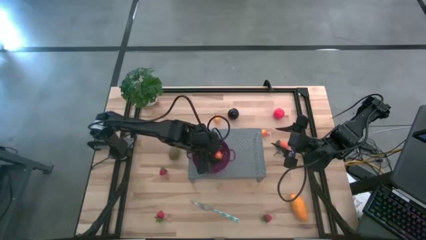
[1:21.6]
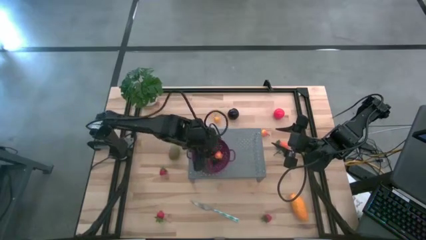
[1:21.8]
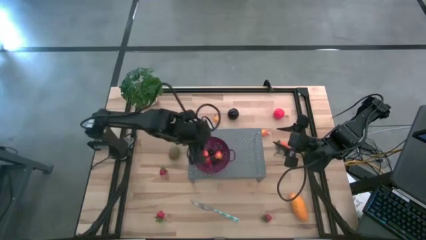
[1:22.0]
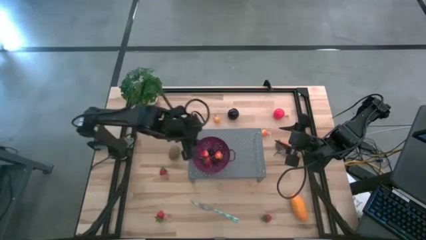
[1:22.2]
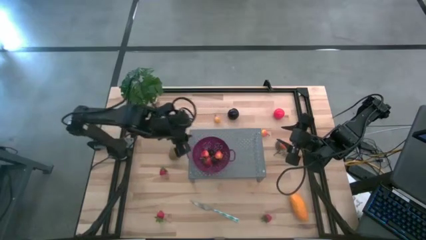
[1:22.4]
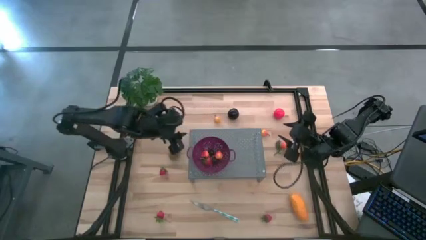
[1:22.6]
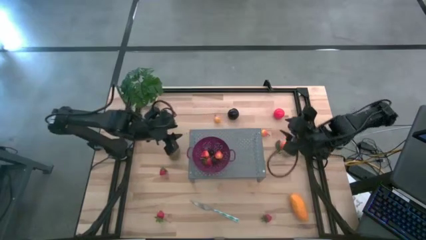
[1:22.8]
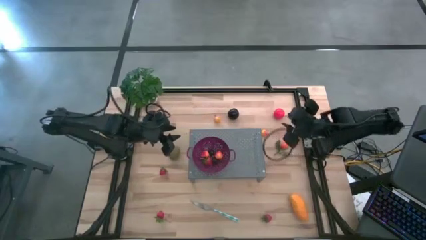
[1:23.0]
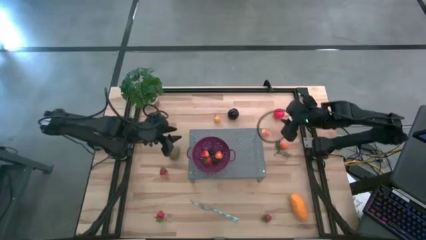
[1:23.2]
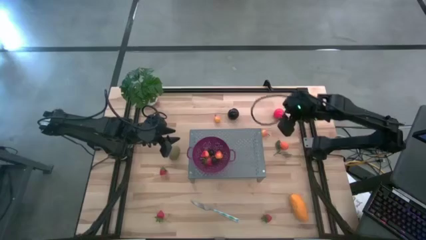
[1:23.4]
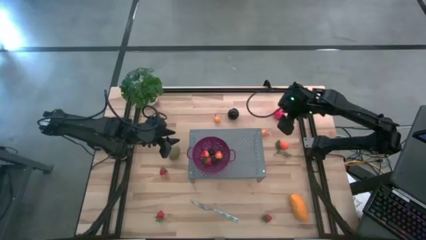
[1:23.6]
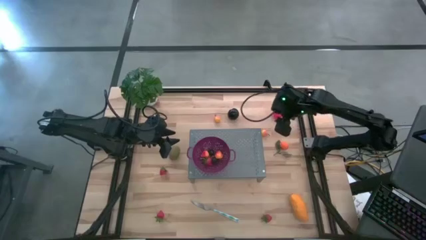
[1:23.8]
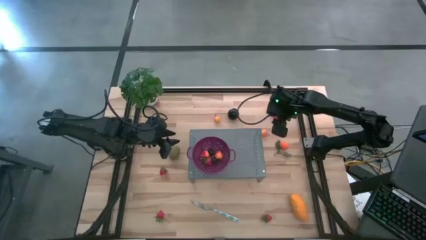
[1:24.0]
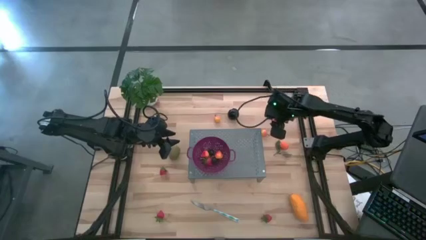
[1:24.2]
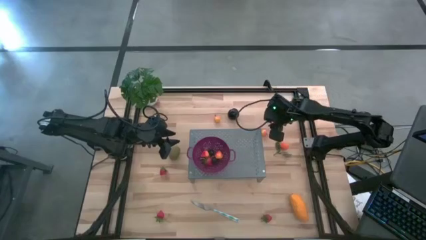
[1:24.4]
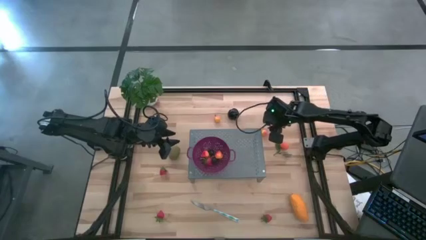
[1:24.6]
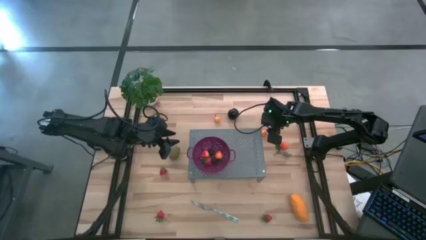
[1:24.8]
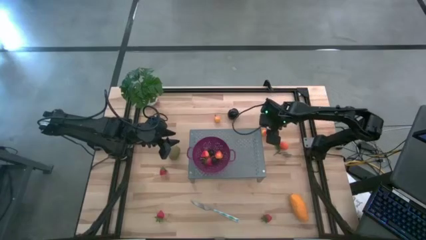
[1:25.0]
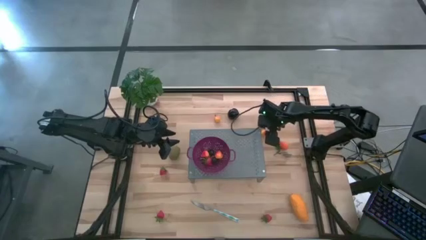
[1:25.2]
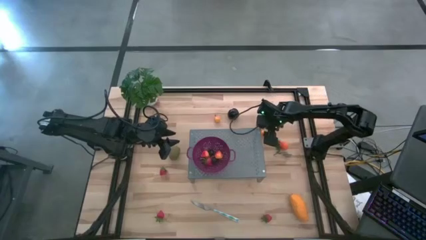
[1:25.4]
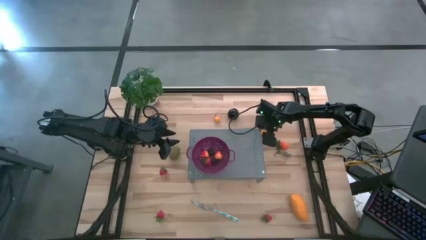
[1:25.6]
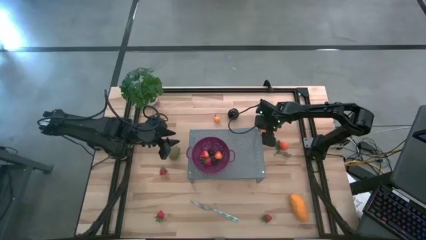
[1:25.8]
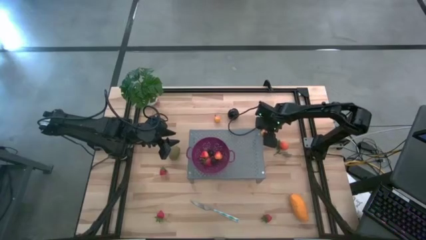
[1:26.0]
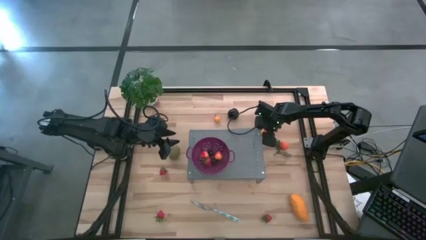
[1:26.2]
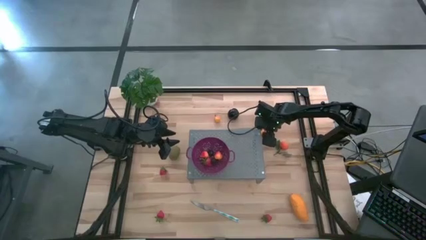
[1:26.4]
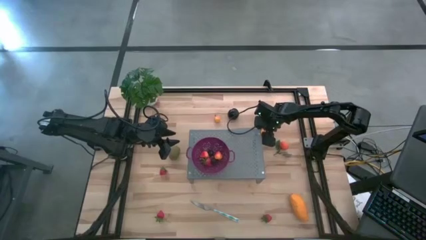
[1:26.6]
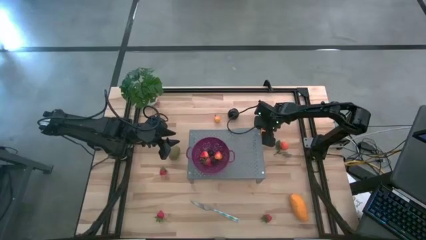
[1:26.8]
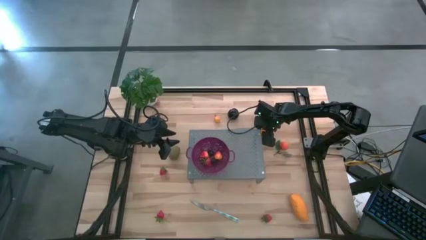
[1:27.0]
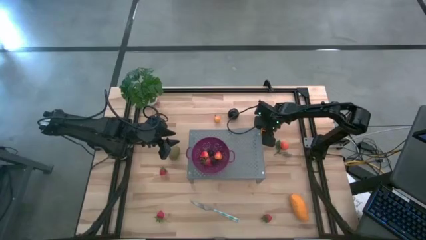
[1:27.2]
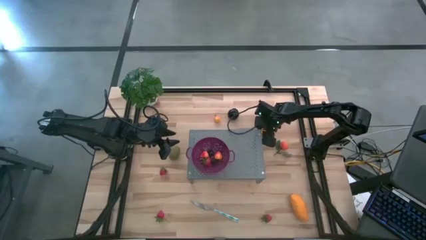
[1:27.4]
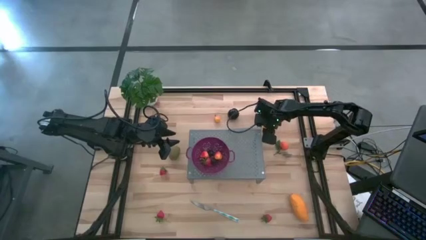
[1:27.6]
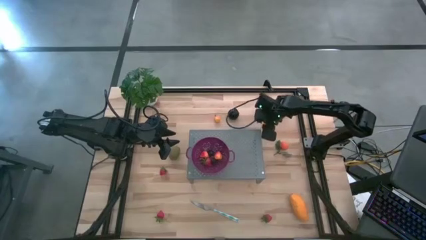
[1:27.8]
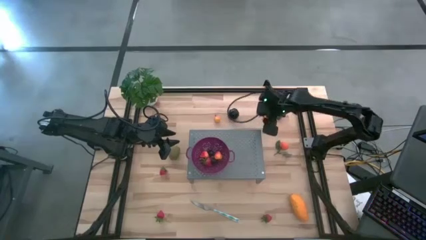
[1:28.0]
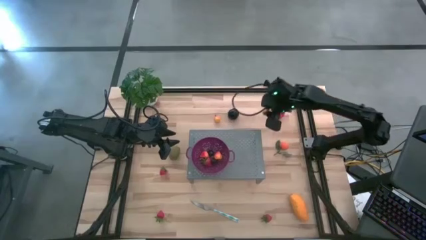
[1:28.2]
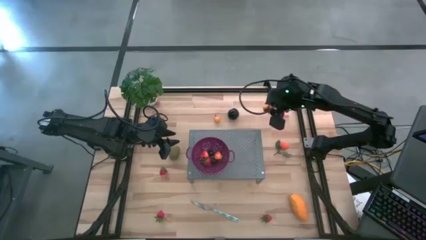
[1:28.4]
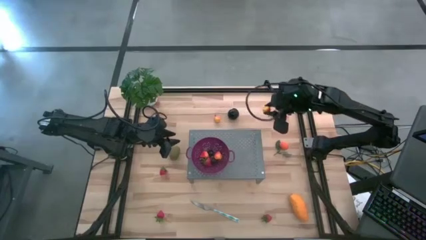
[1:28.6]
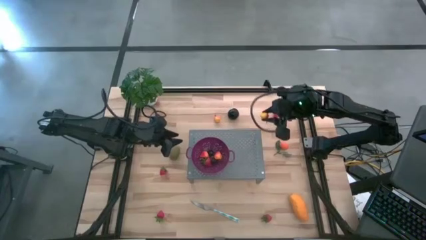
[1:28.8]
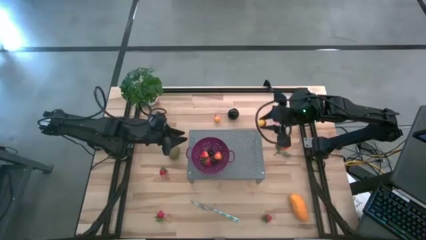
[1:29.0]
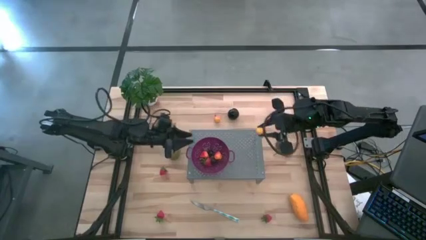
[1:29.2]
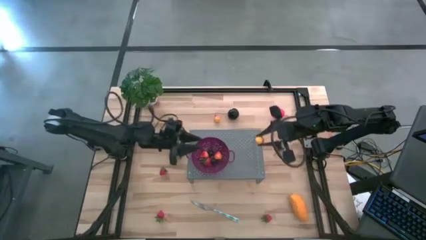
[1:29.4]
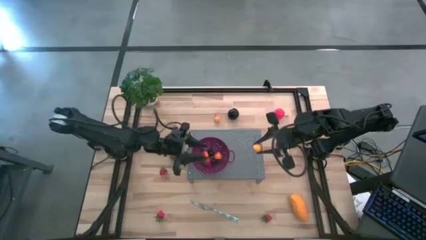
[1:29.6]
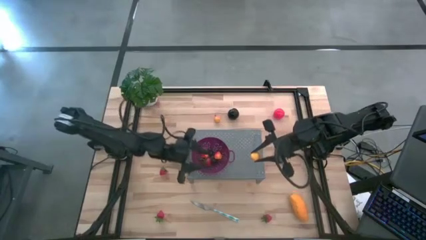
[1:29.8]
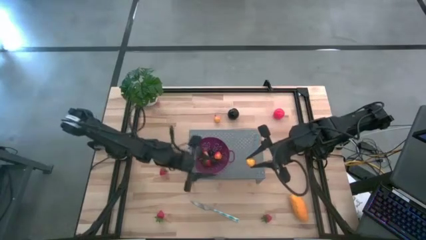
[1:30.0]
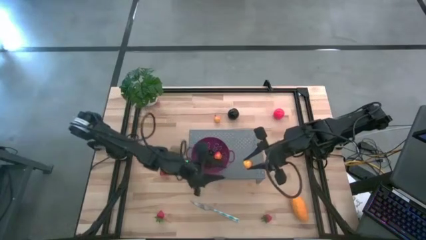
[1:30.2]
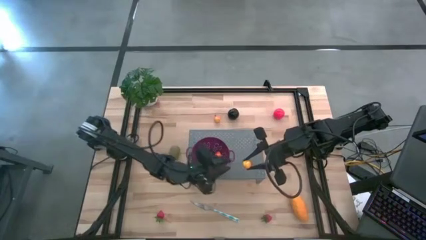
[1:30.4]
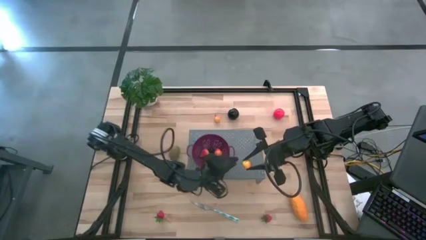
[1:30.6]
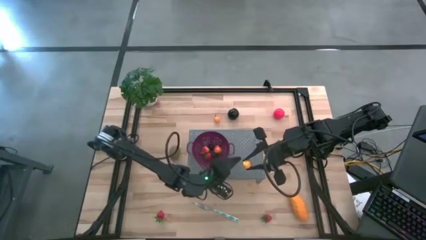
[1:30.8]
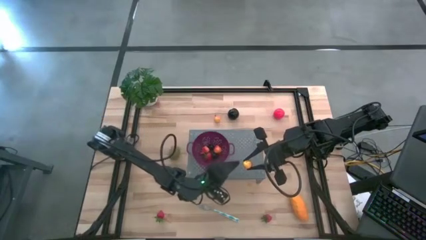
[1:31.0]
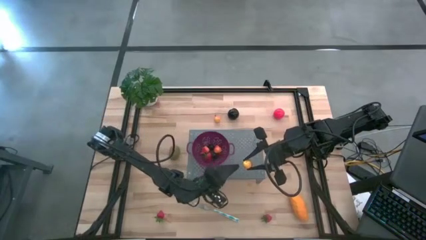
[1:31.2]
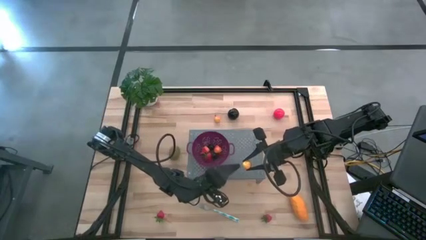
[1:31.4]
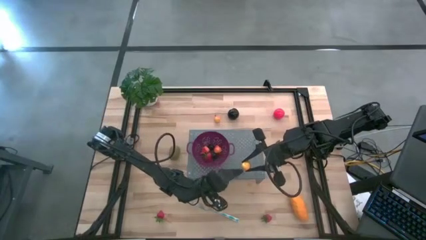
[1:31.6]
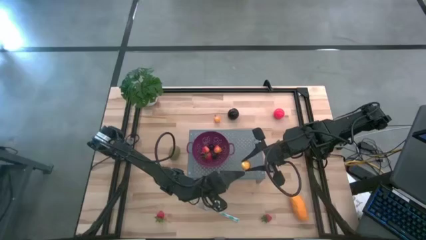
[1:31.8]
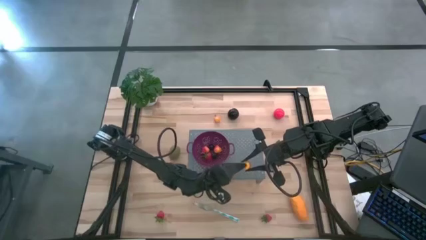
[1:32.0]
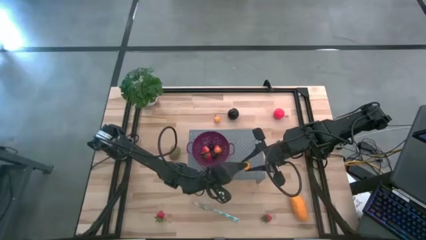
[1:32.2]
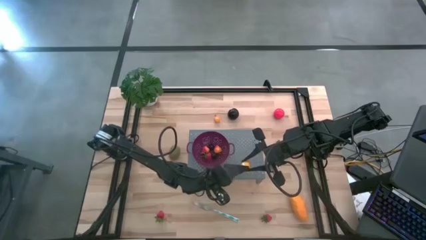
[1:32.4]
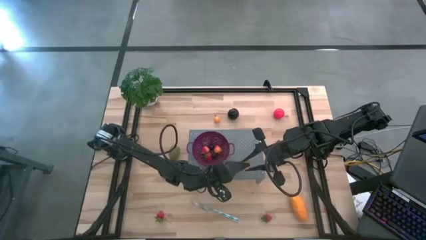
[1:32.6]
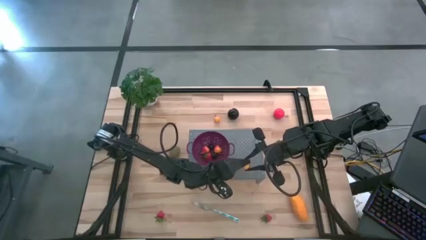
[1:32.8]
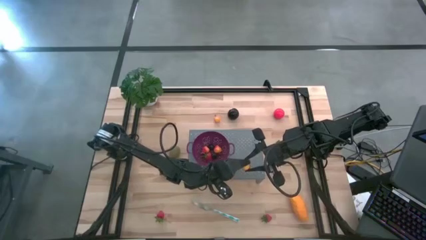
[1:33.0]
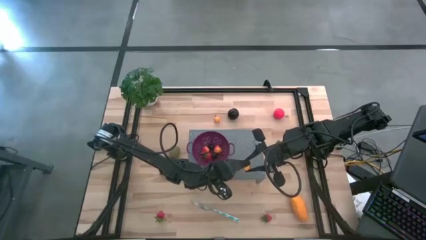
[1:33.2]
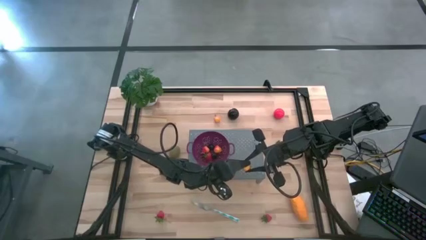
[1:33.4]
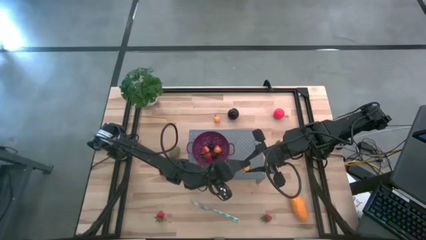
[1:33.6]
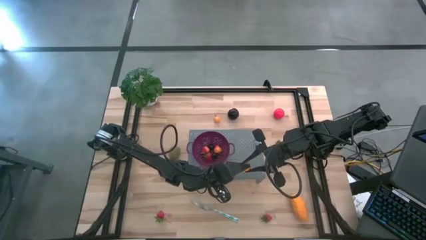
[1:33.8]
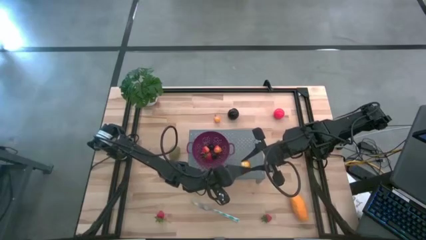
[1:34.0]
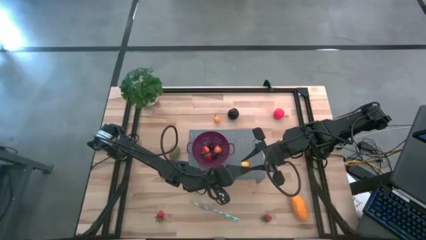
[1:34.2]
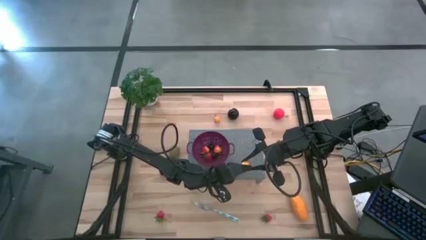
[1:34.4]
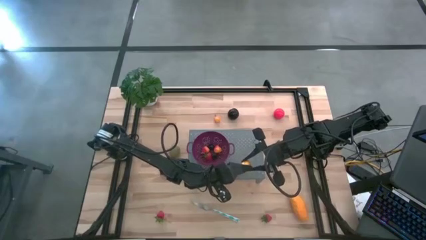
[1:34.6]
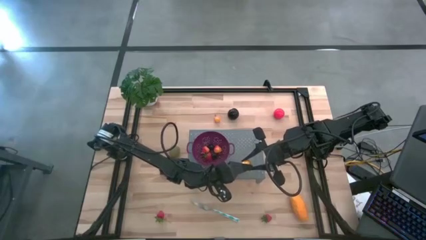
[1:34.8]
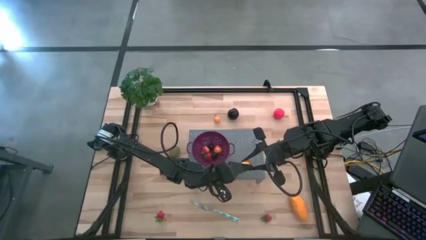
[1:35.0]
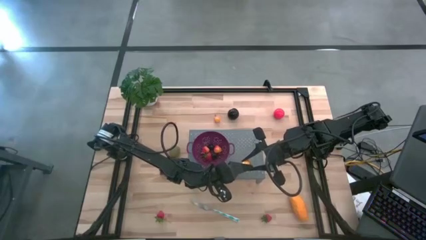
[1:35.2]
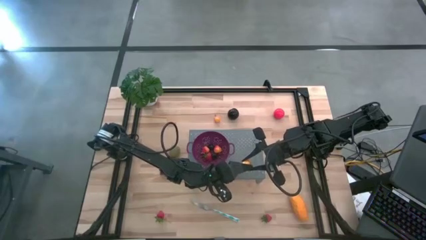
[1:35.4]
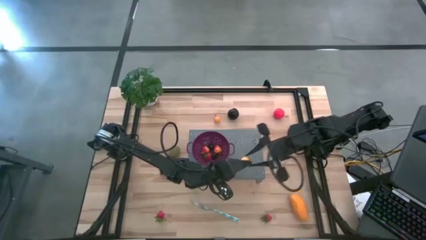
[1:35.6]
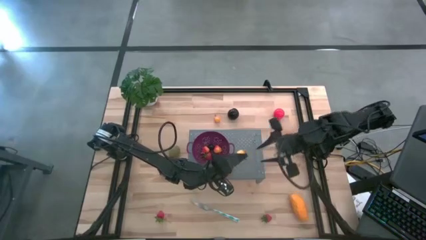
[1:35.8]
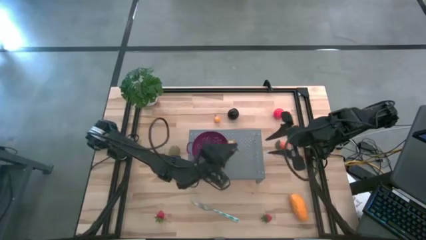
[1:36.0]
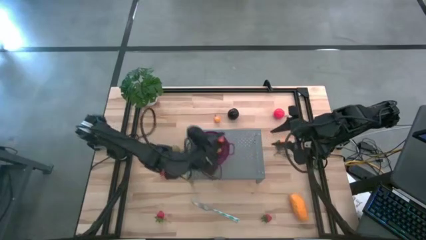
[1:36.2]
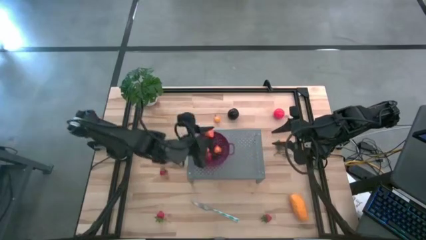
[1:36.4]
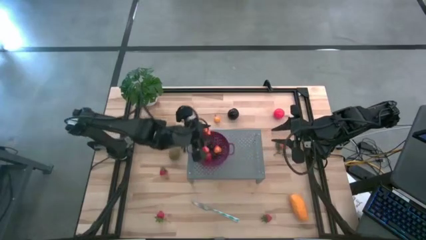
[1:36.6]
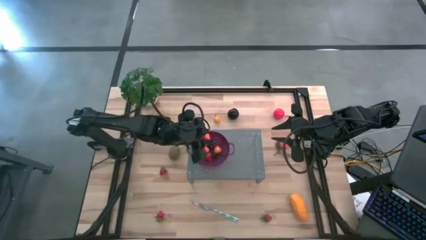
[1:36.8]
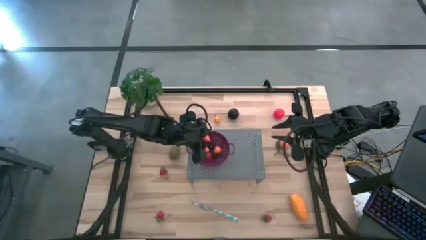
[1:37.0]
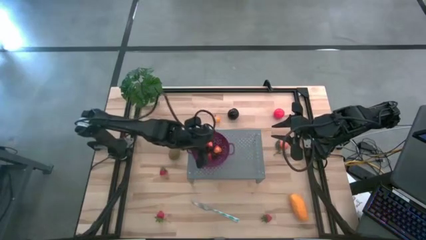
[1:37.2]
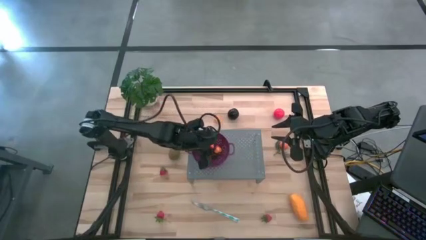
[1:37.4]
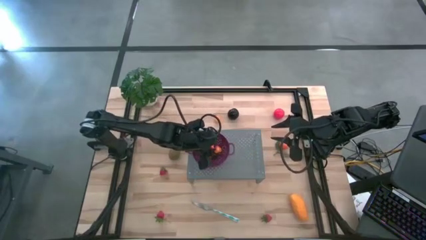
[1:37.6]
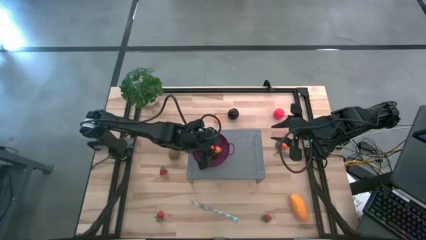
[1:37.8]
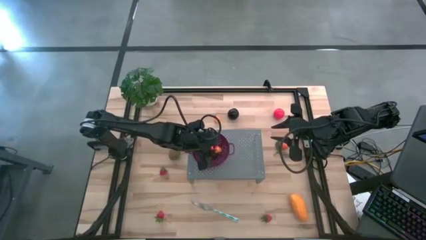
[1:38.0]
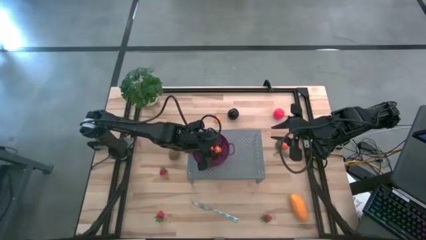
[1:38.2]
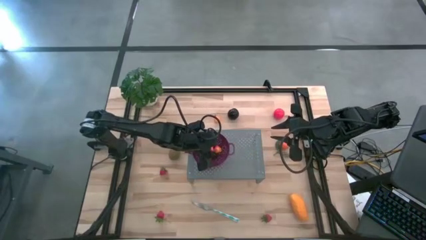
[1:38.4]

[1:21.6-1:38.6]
Task: Pick & Place Fruit
Put the pear into the purple strainer bowl
